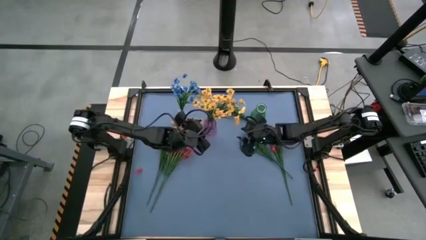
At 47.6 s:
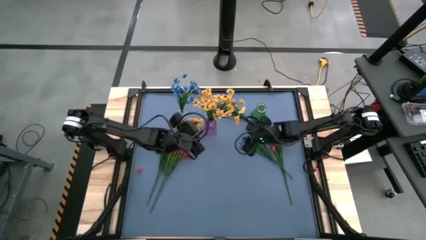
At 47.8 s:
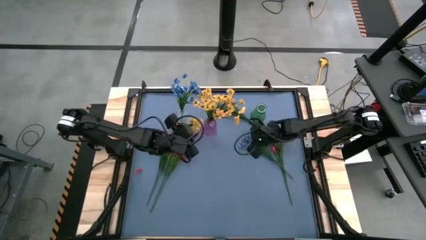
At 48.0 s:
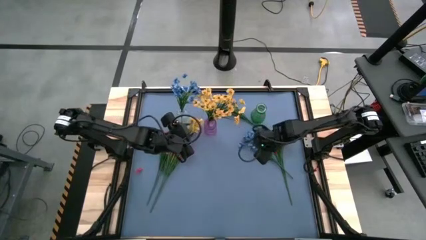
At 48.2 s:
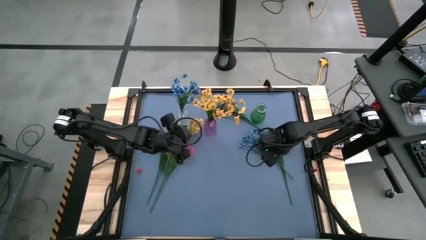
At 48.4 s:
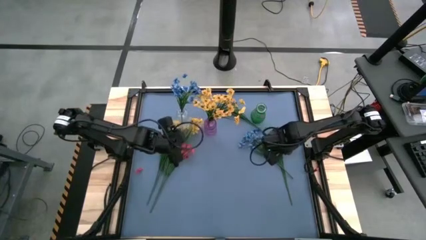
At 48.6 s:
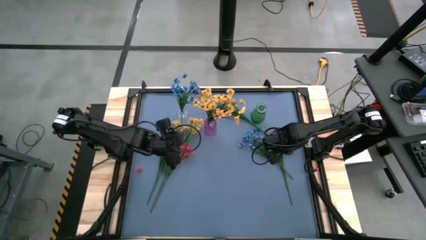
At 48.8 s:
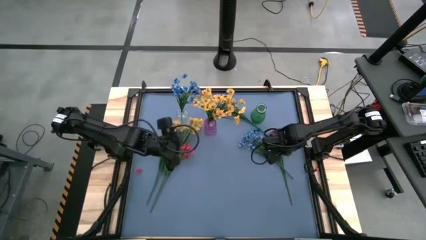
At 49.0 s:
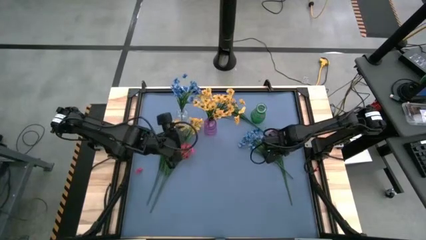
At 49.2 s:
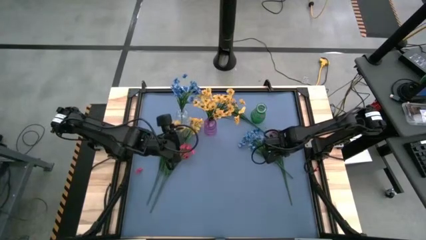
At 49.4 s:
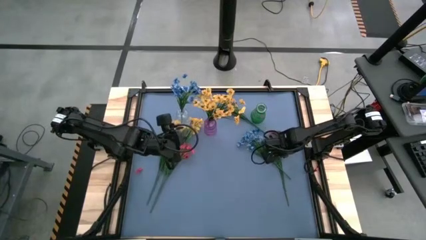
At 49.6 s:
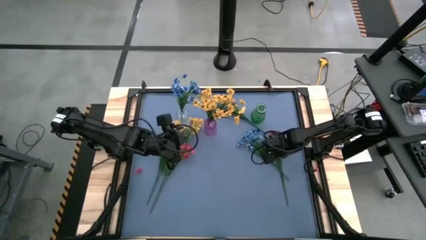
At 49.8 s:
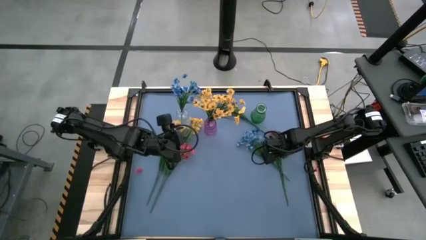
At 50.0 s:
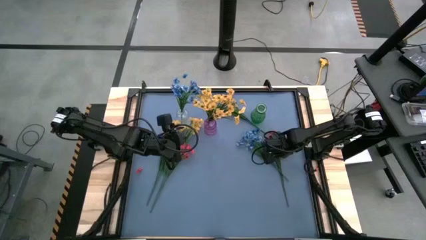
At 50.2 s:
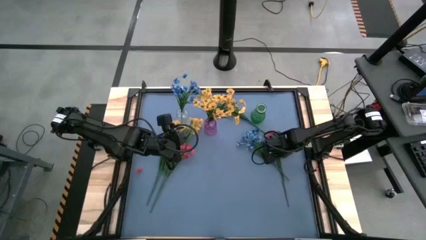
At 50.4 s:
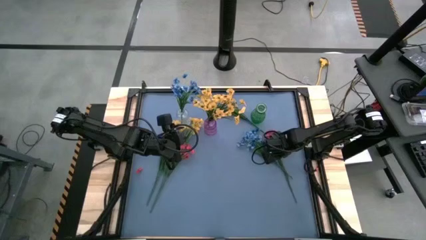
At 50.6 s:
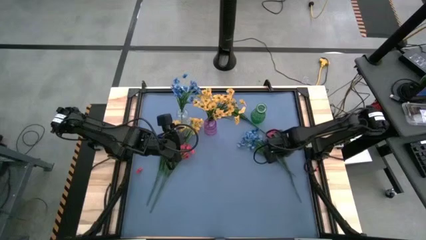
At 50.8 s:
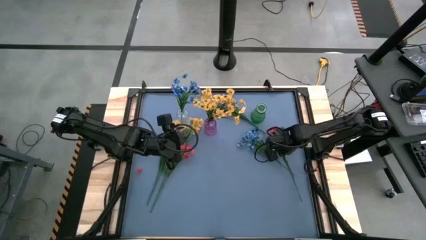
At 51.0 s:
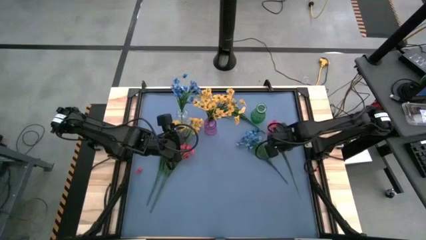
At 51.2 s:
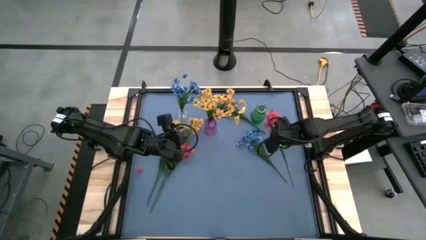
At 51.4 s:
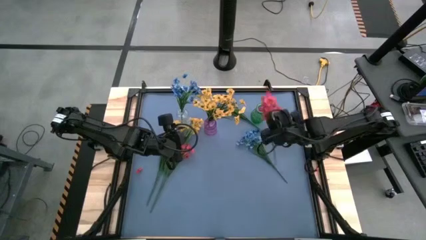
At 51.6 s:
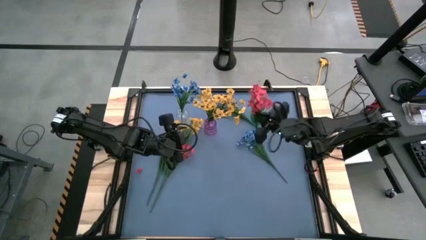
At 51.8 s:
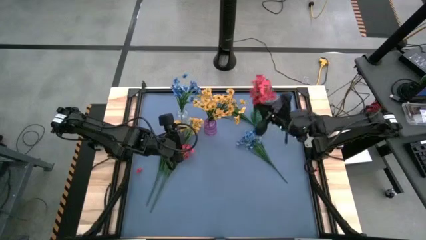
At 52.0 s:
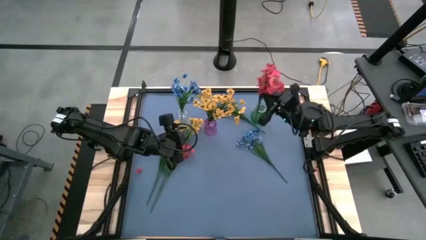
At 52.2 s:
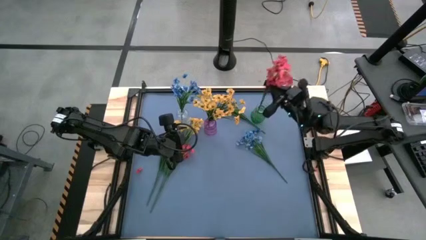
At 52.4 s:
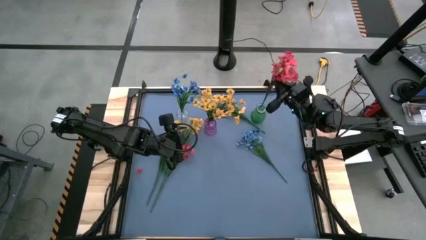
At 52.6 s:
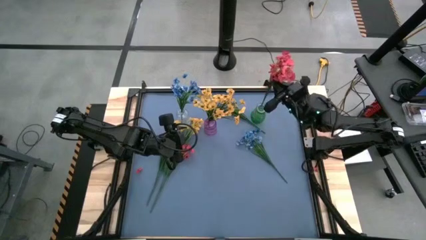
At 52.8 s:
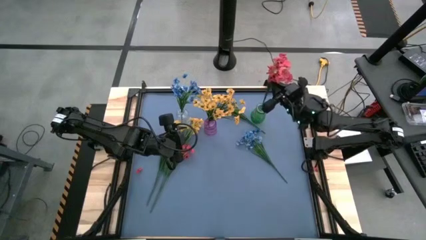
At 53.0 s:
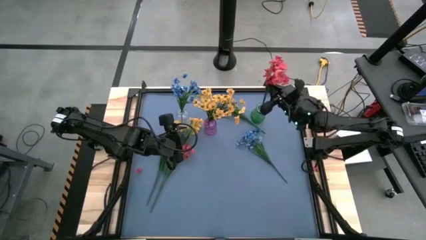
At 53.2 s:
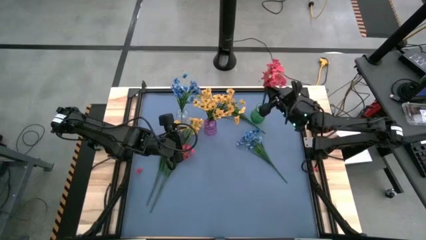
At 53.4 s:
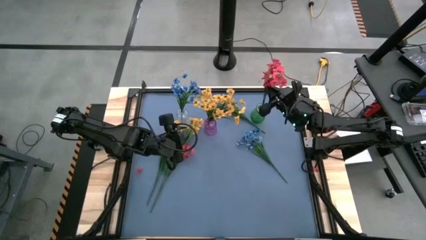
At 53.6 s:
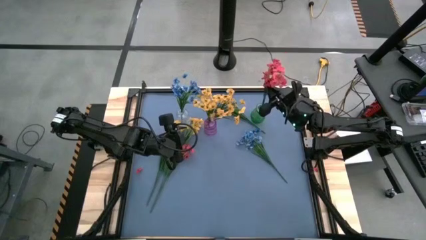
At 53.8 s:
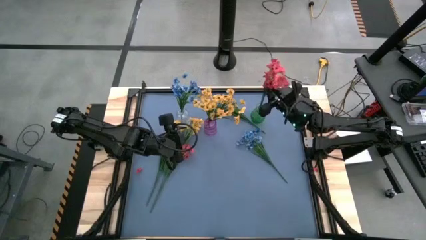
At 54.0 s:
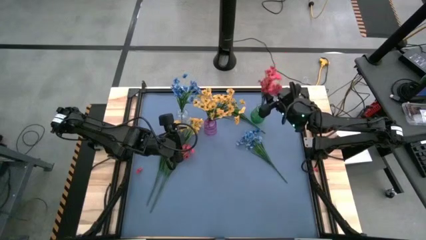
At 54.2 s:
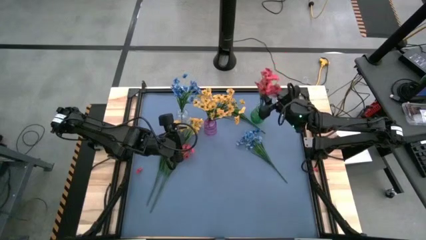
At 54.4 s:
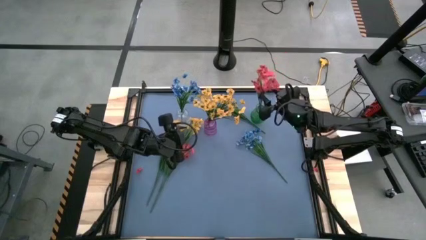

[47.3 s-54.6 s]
Task: Sort flowers into vase by color
Put the right red flowers into the green vase

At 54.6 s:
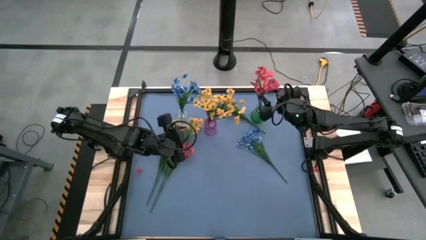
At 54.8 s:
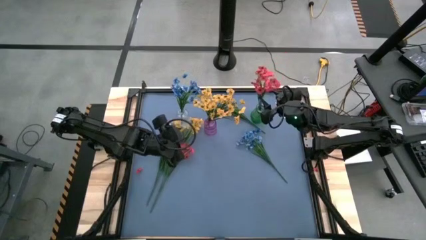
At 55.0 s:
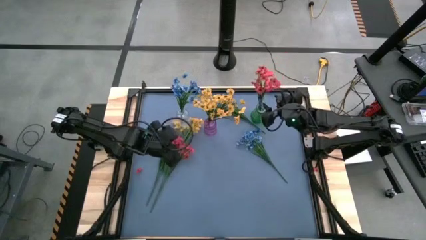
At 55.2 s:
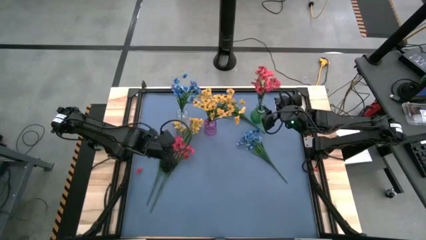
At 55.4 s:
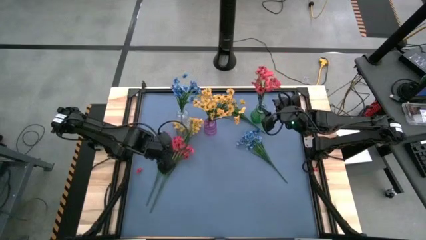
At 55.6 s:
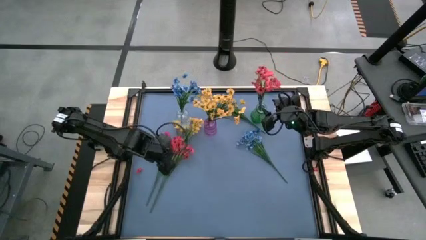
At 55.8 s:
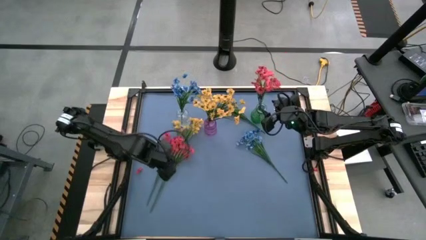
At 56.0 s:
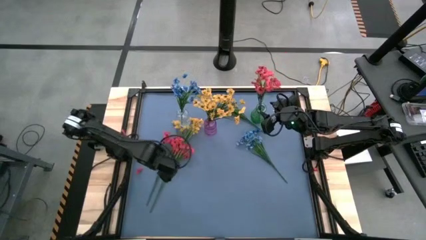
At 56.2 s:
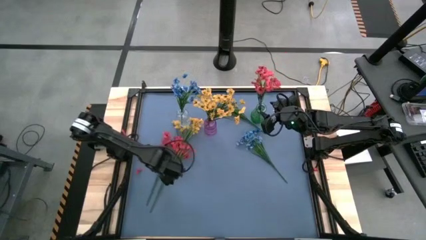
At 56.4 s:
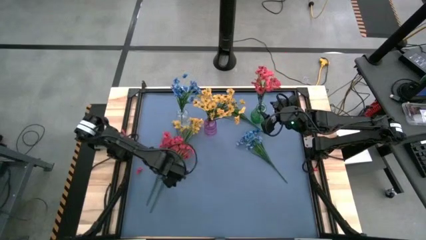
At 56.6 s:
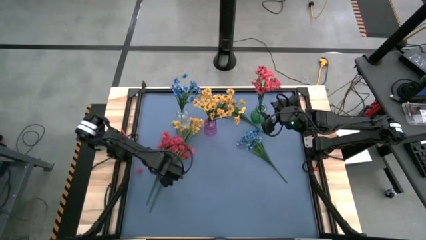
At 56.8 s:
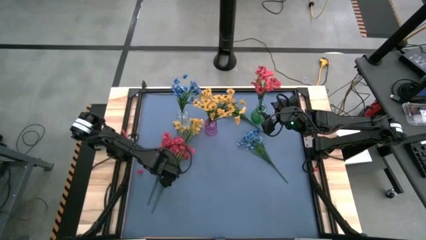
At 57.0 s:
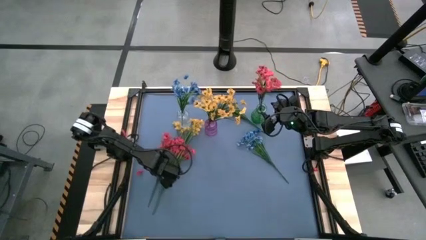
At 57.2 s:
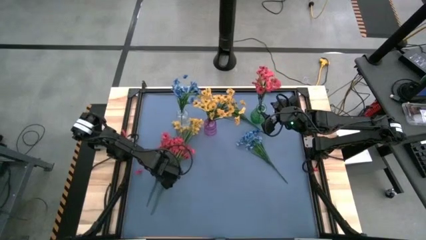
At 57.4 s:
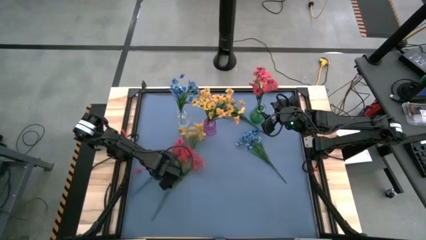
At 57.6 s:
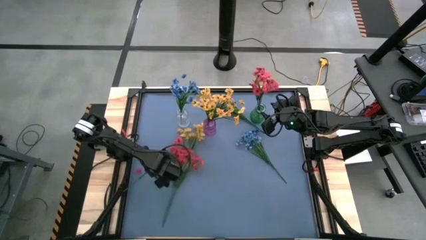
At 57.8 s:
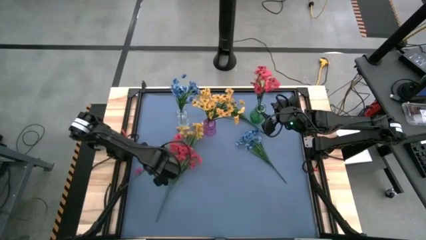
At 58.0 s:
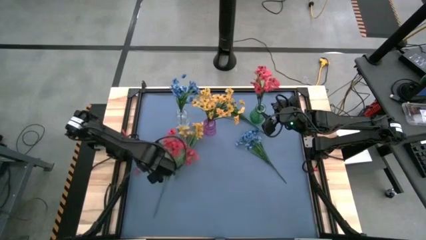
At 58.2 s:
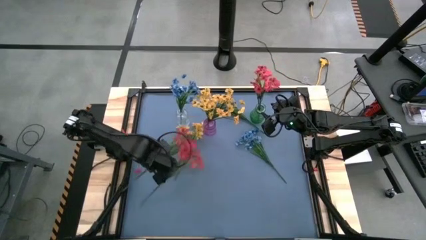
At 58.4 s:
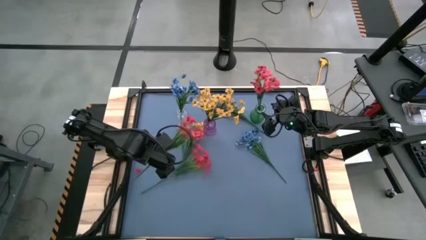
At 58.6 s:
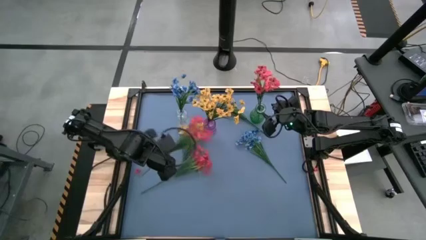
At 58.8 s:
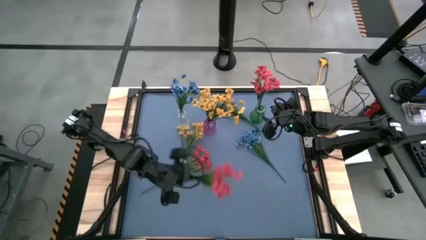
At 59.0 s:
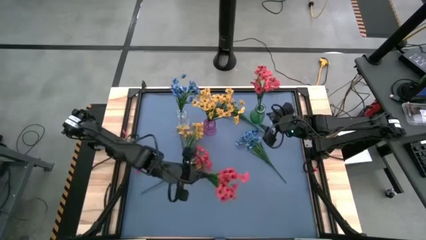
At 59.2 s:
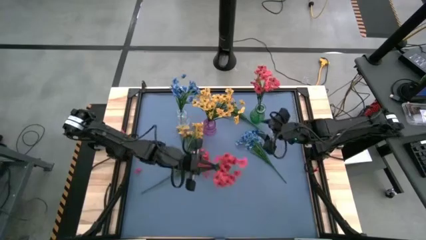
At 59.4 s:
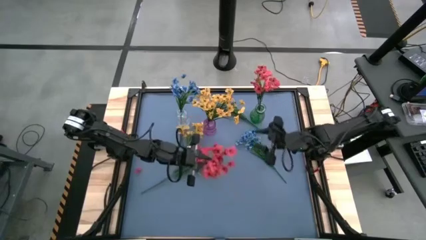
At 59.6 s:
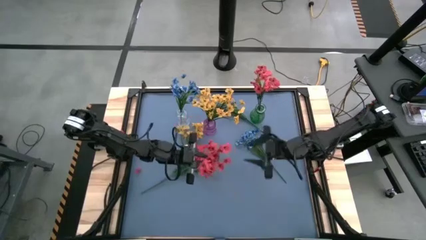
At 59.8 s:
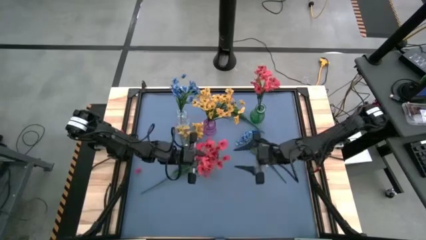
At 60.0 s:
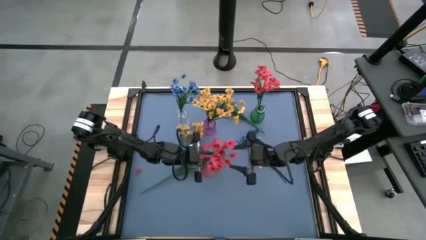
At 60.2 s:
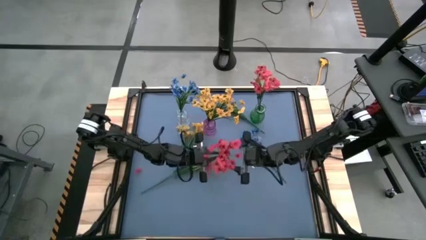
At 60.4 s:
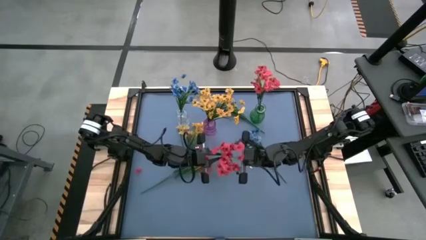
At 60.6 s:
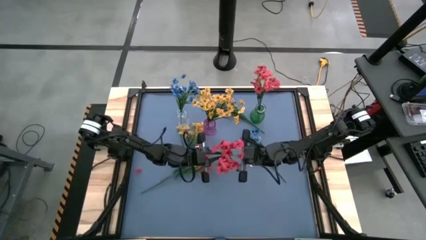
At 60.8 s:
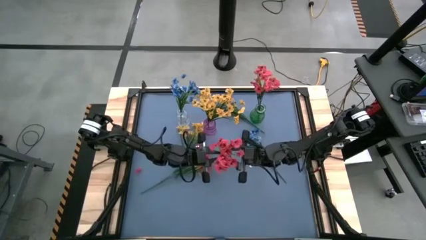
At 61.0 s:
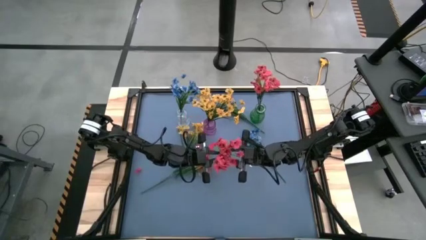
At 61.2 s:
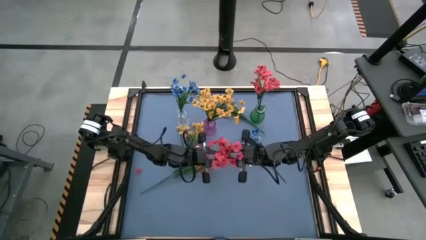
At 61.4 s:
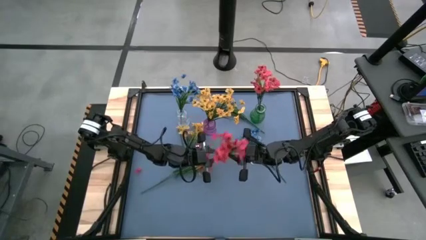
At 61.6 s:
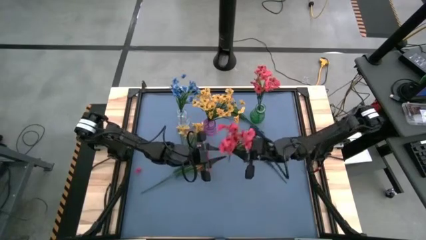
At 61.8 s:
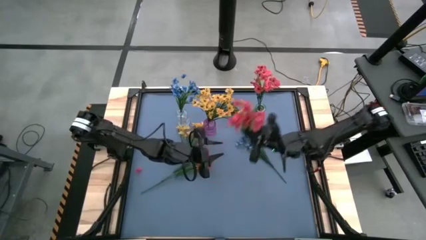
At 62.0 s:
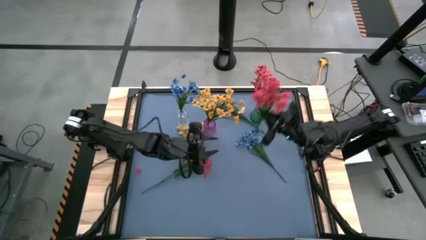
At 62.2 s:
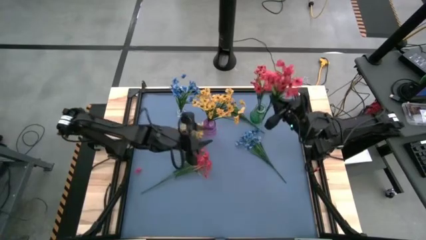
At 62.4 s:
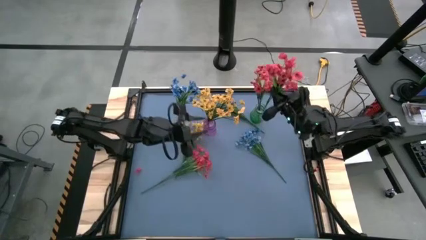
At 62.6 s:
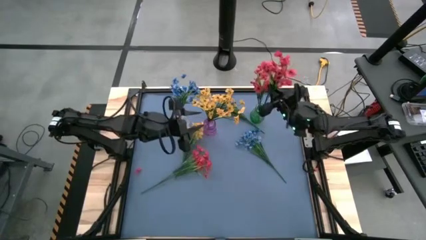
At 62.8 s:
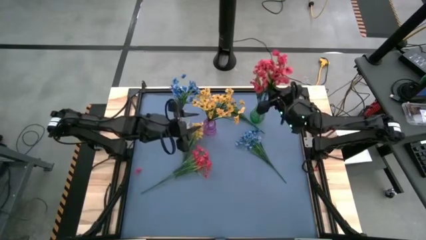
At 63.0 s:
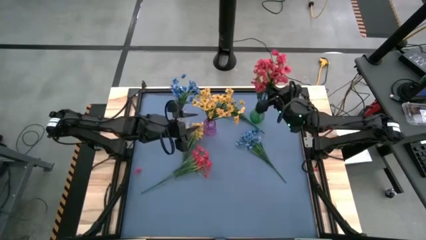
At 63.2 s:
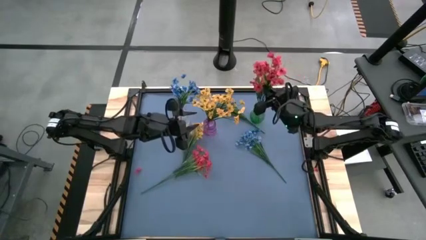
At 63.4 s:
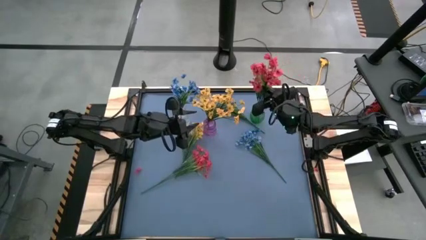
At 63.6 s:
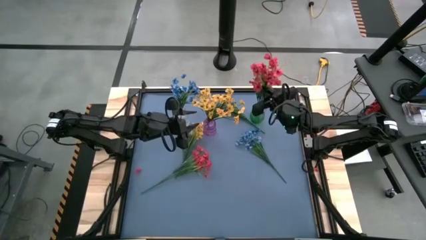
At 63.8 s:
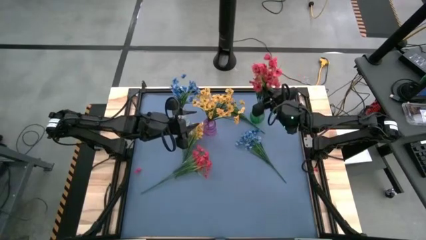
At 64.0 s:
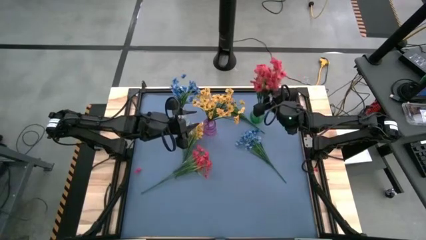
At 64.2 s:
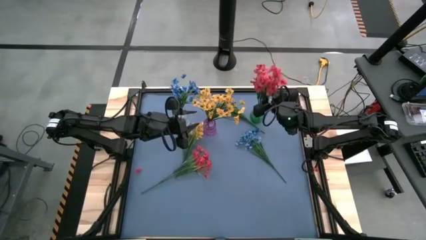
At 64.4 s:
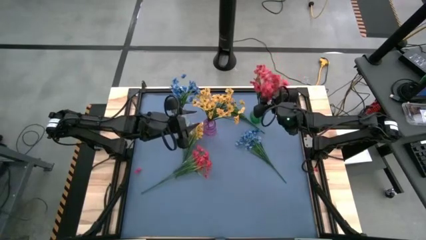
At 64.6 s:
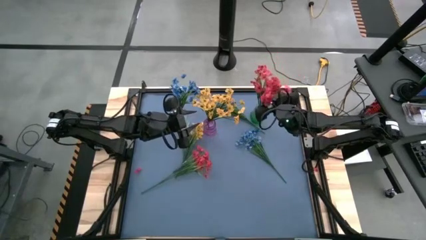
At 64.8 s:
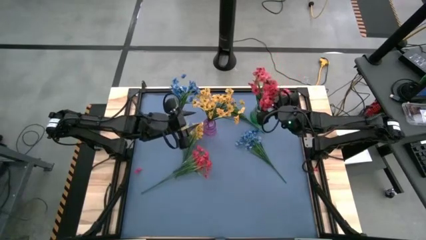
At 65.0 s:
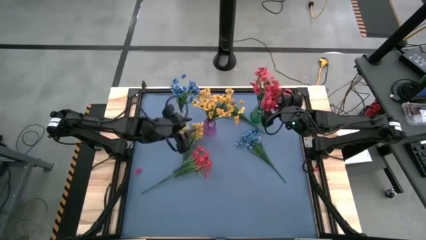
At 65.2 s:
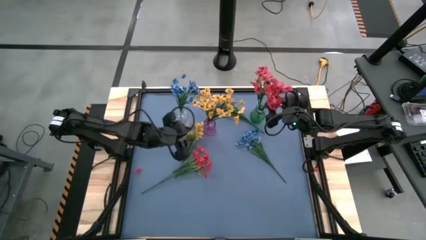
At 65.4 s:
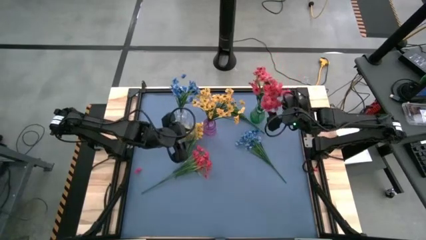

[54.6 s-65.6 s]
Put the left red flowers into the green vase
